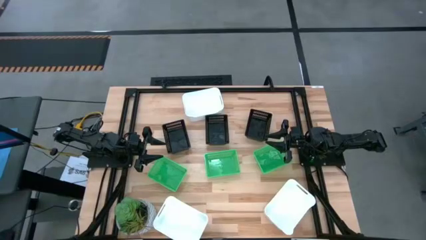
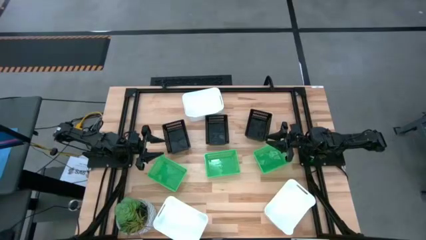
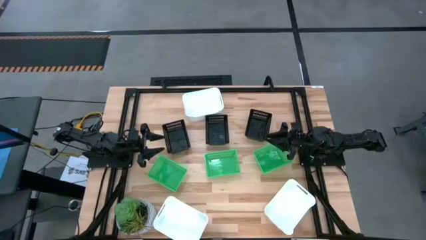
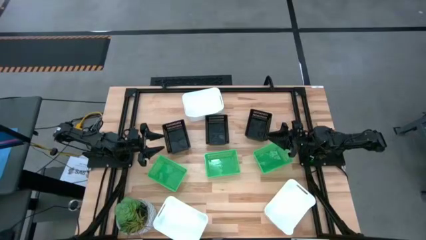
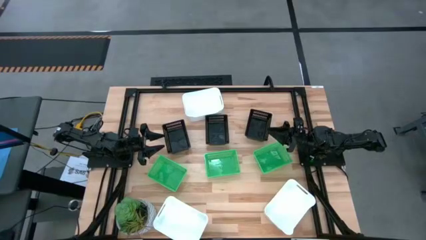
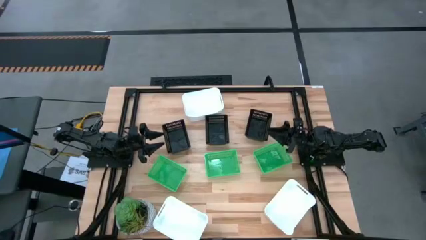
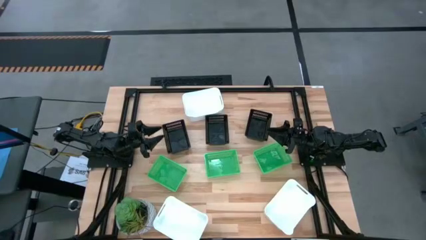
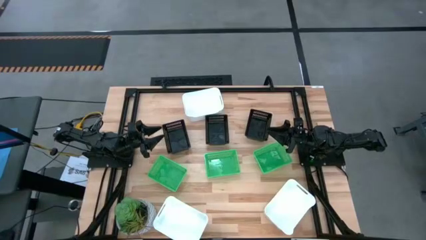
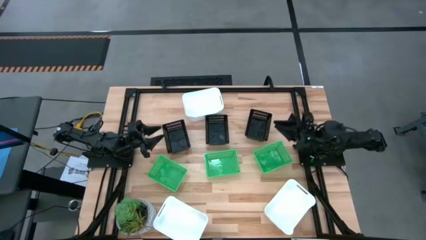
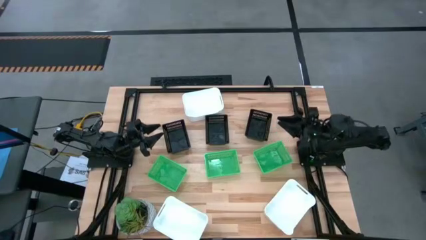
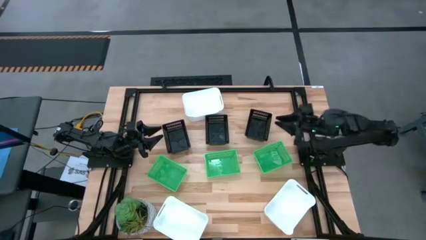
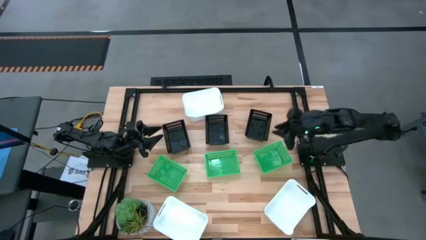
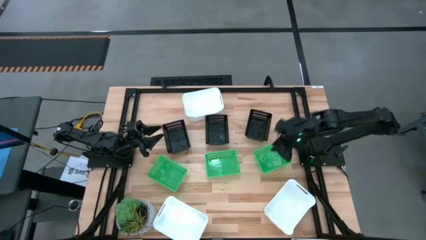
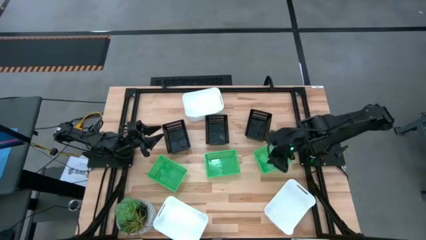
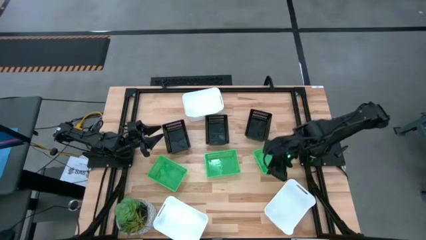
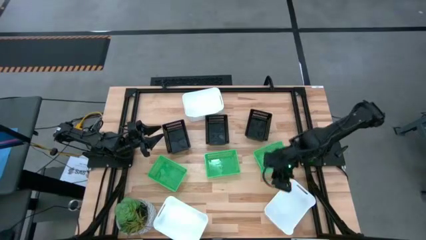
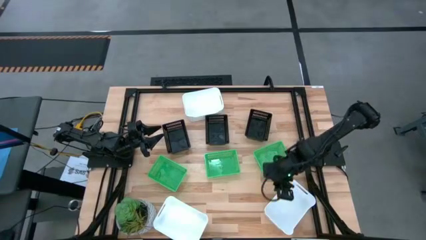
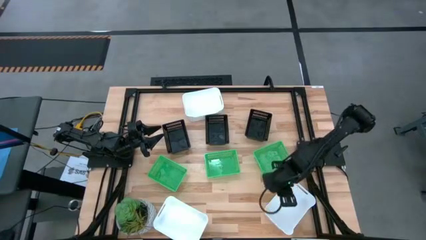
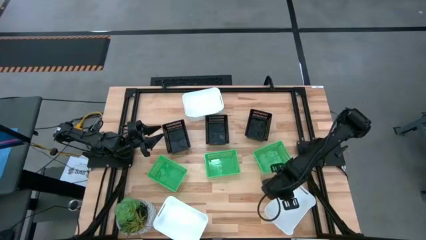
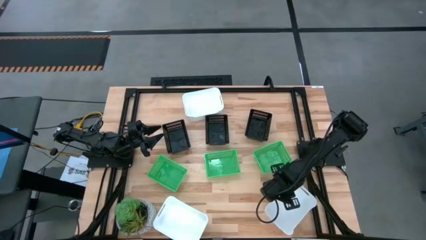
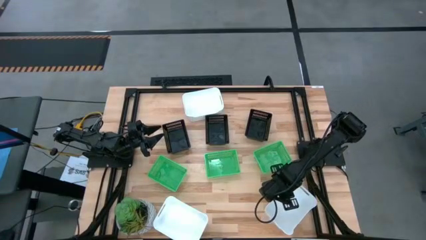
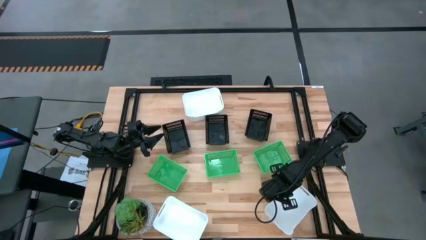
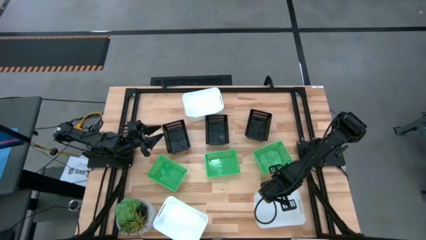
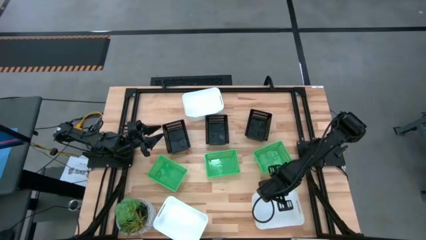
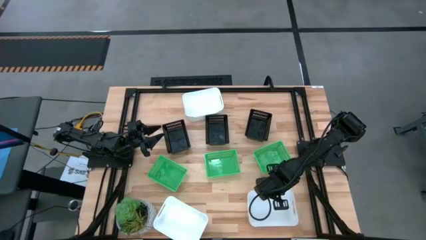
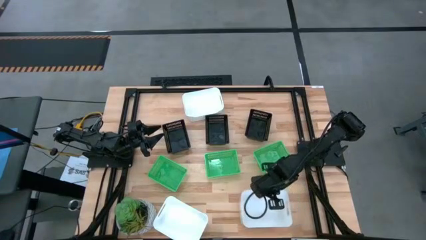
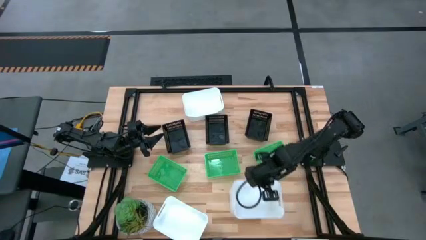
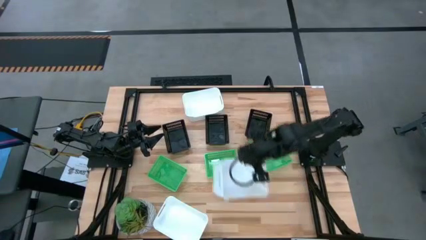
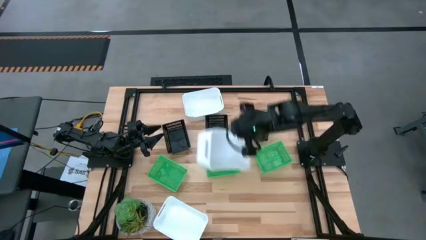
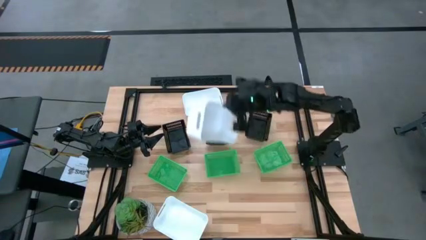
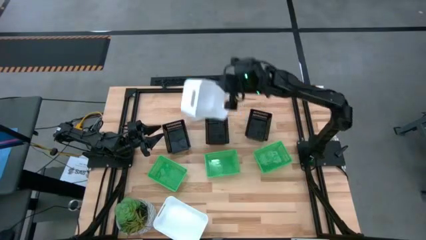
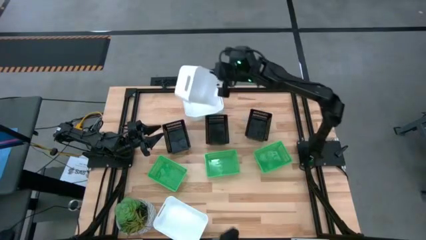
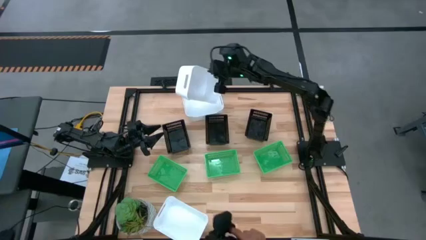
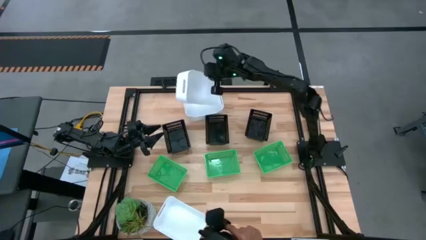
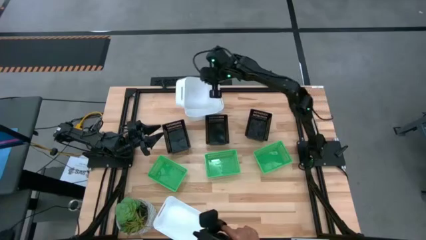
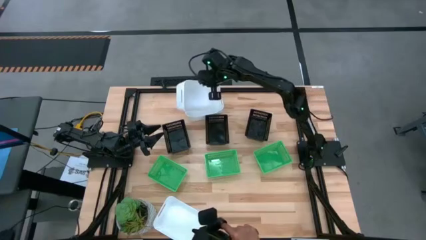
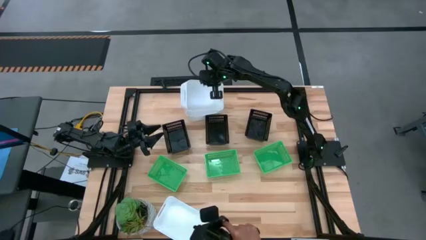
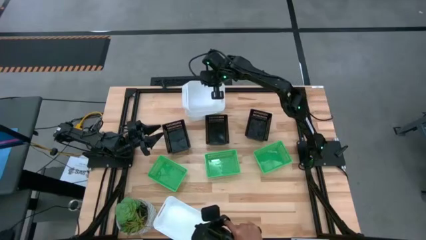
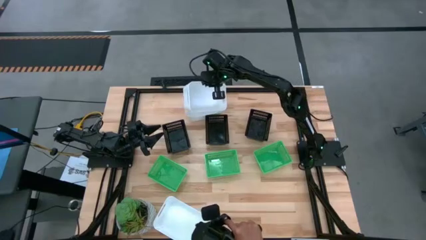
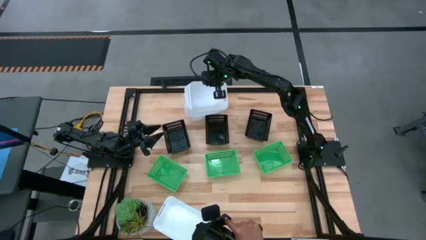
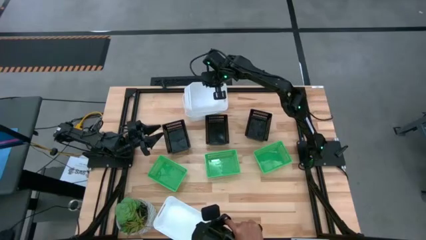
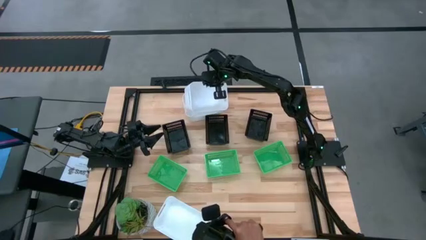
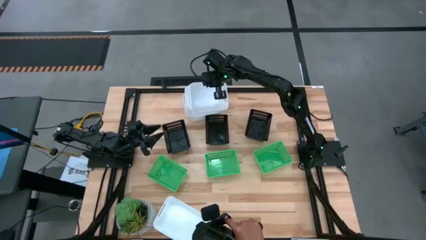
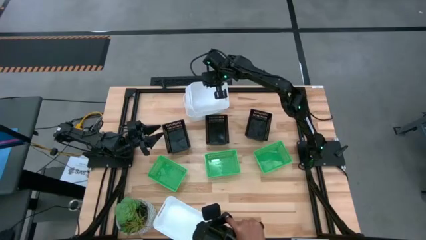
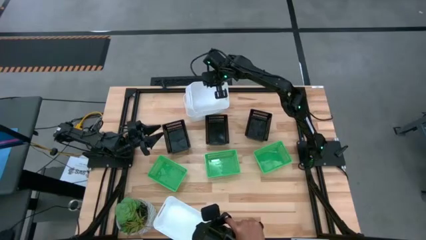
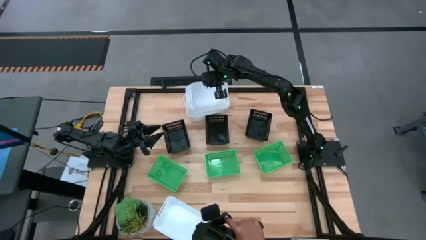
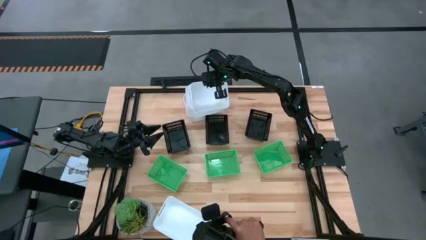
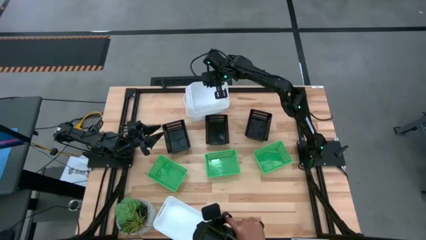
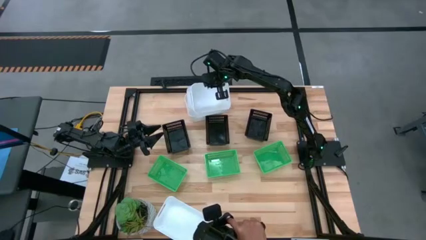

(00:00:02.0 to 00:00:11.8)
Stack the bottom right white bin on the top white bin

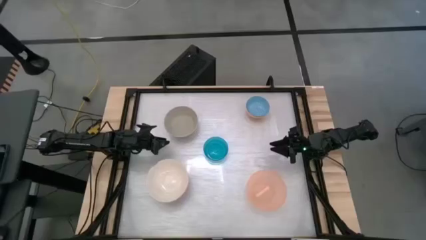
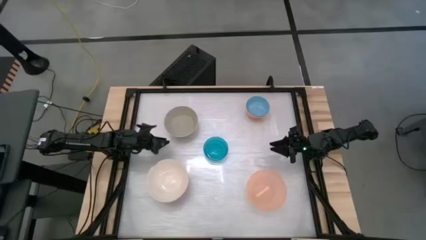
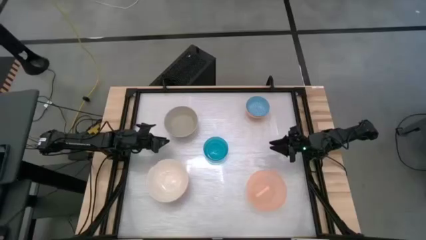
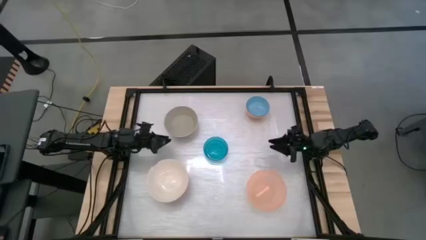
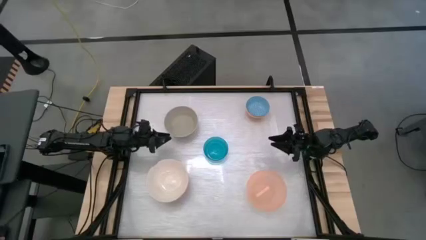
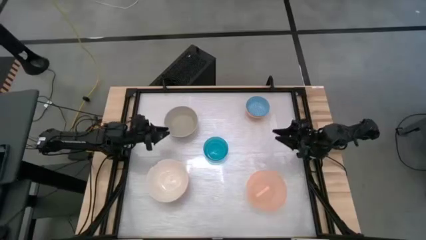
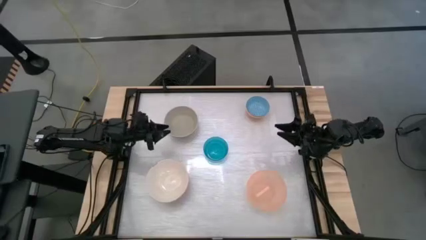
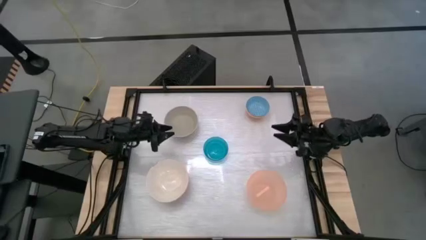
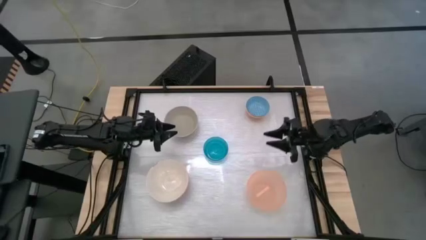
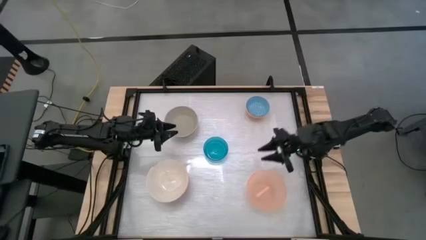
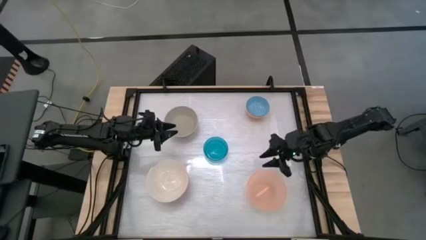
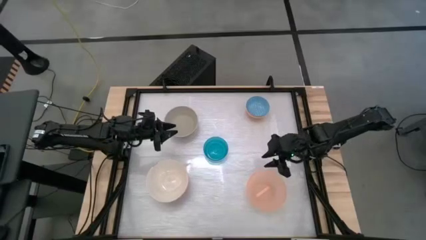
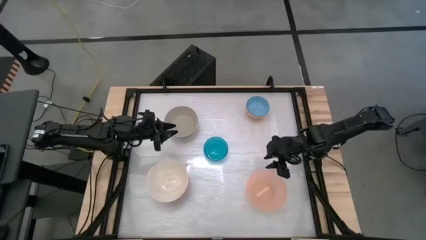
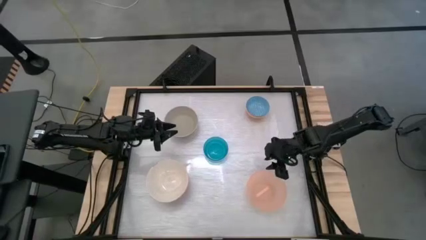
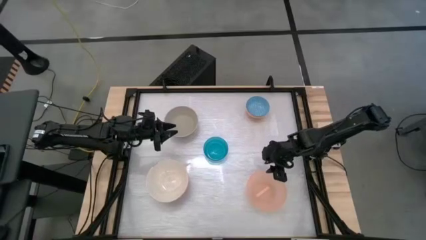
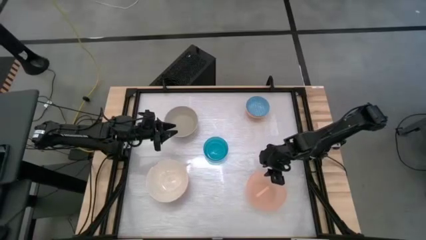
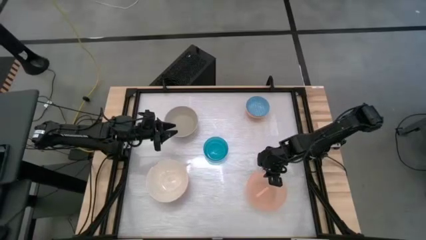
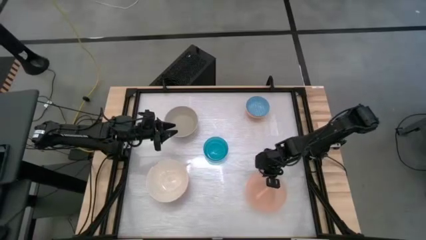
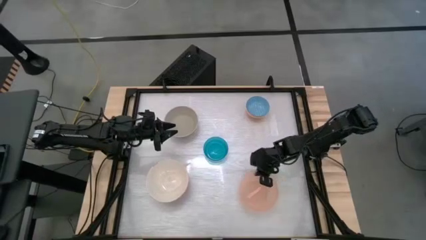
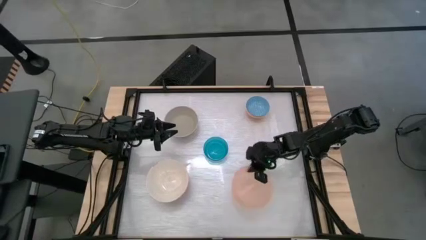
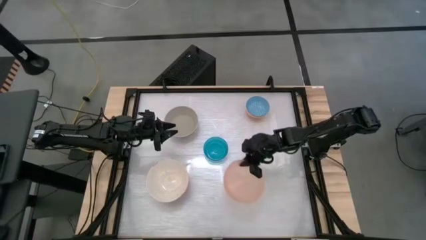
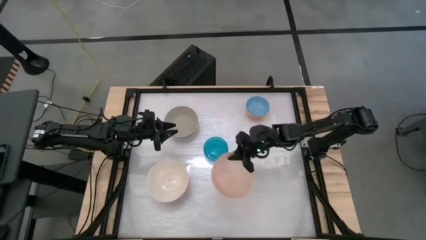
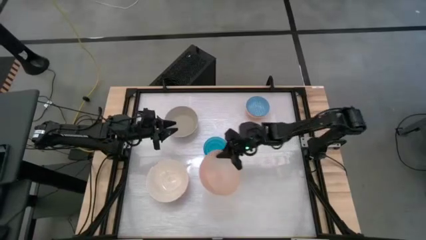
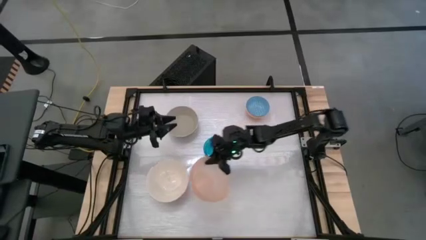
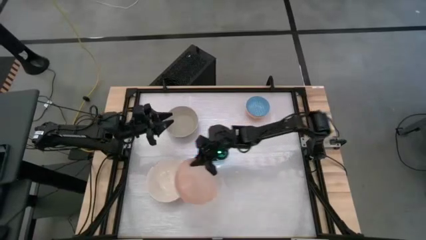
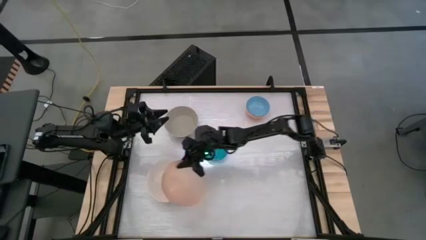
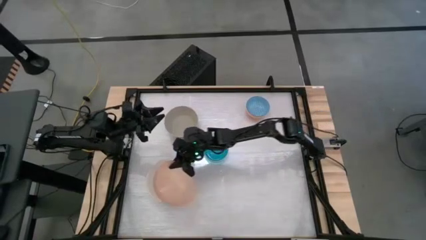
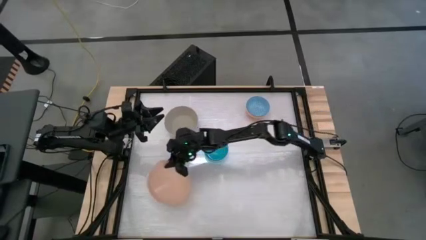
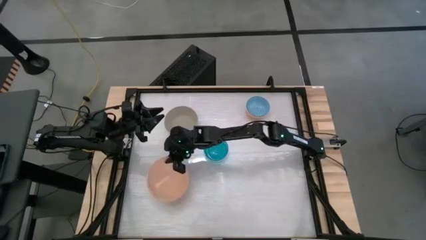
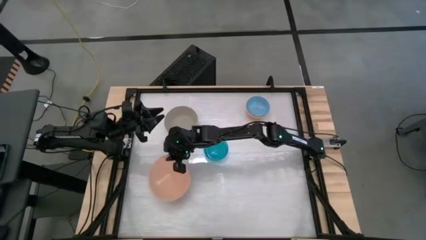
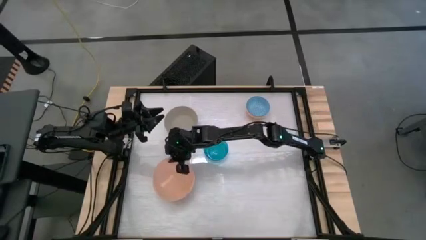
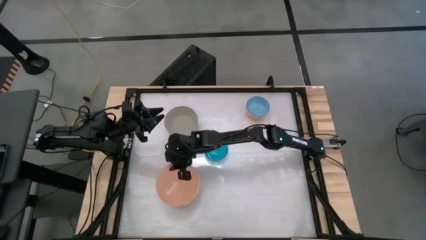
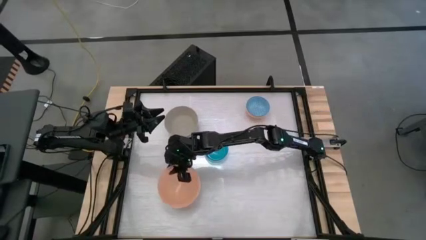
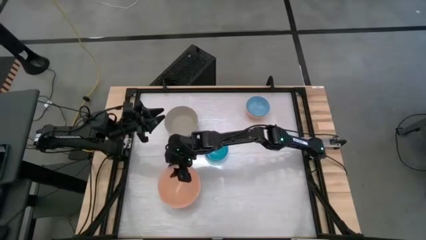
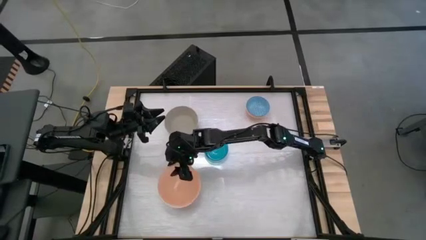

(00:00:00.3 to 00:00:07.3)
Stack the light orange bowl on top of the white bowl
